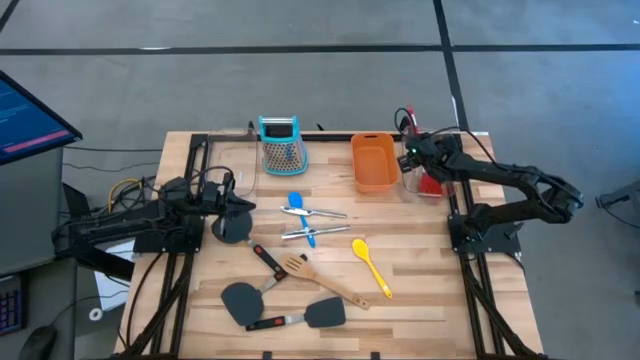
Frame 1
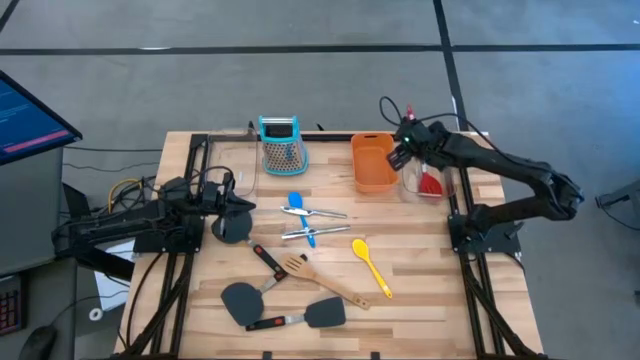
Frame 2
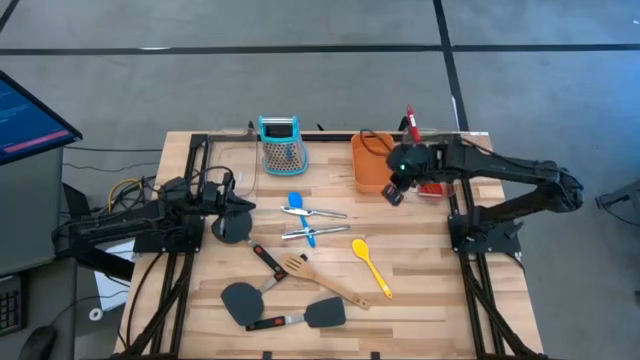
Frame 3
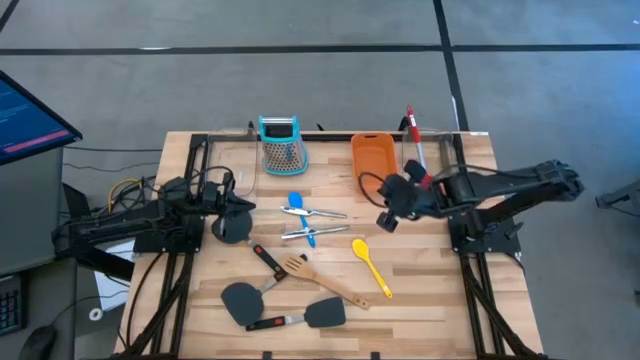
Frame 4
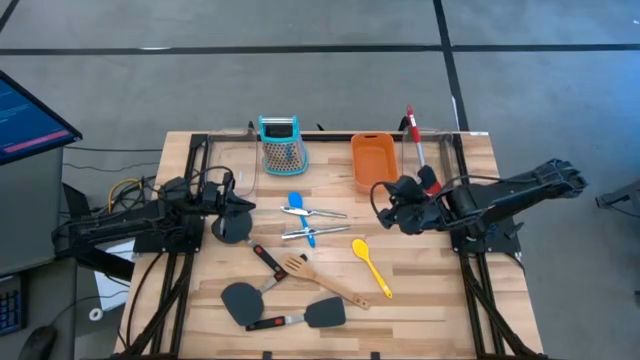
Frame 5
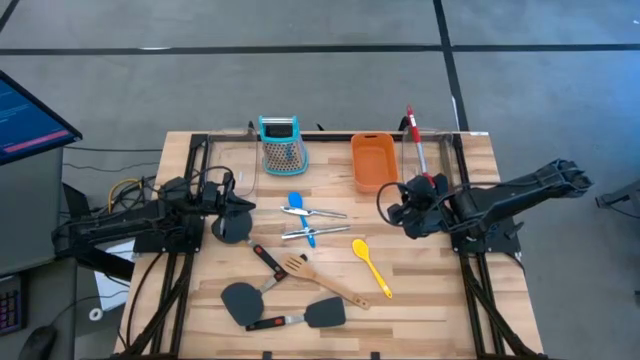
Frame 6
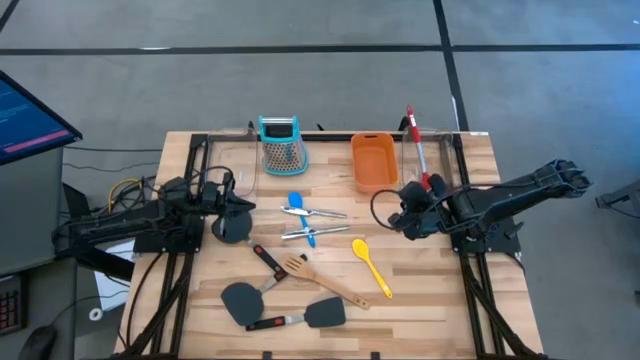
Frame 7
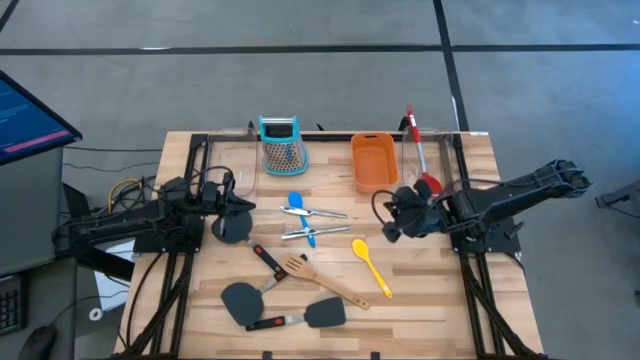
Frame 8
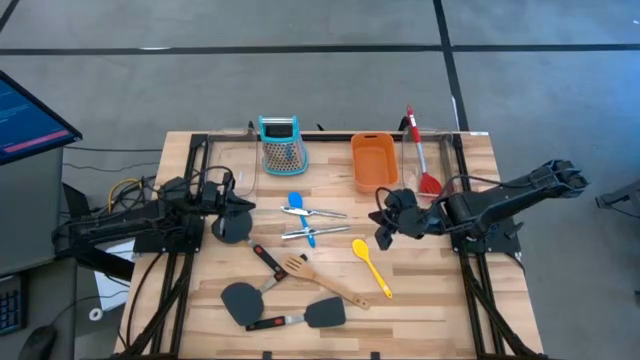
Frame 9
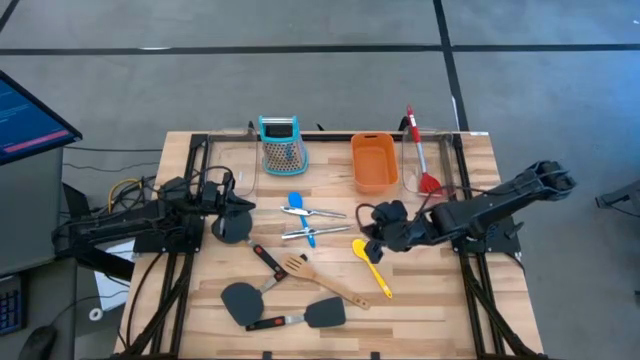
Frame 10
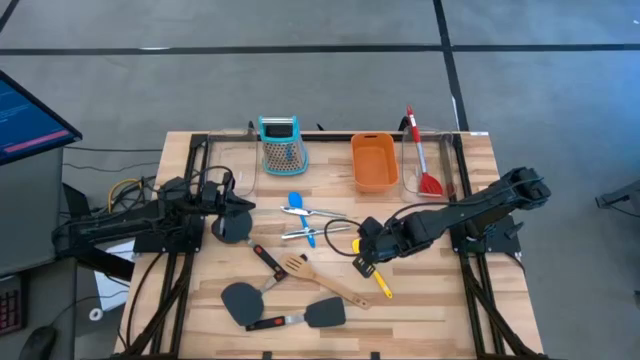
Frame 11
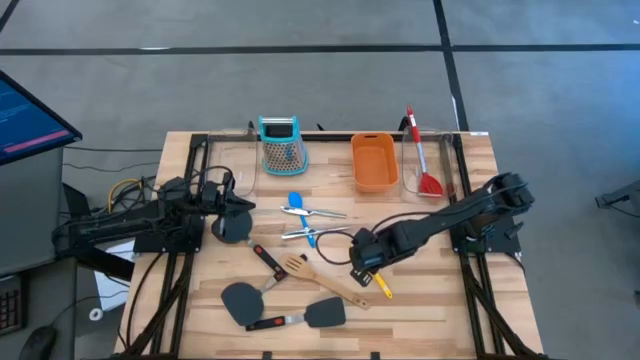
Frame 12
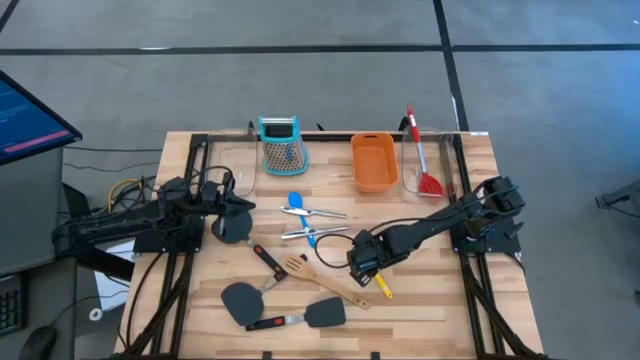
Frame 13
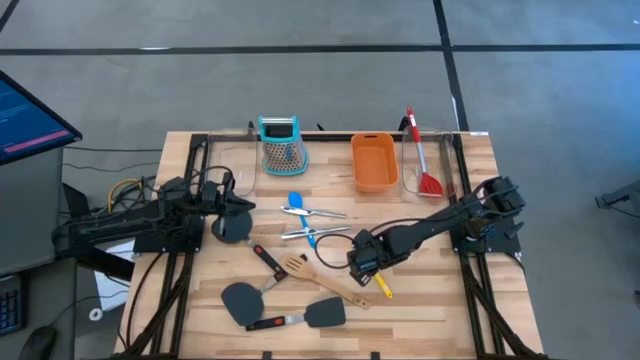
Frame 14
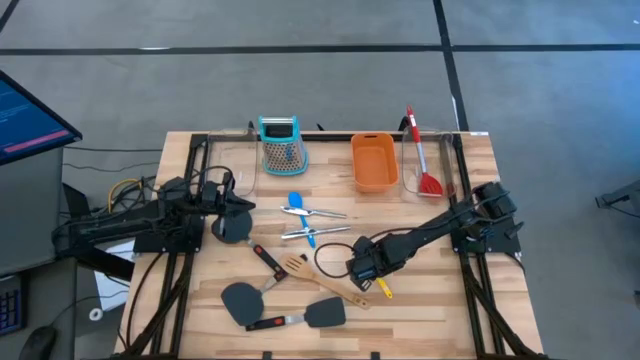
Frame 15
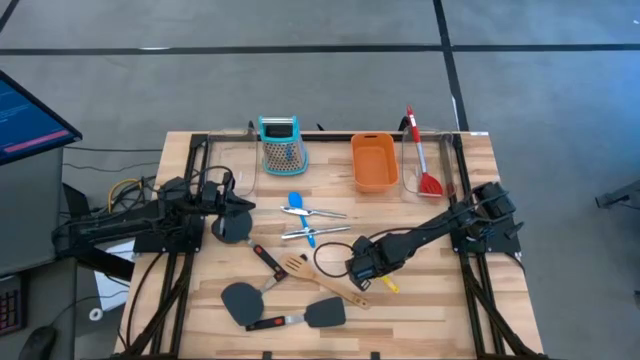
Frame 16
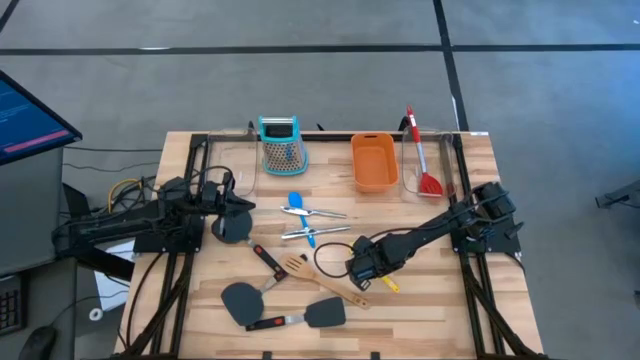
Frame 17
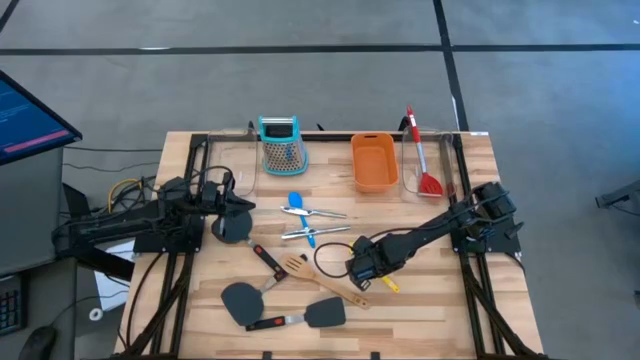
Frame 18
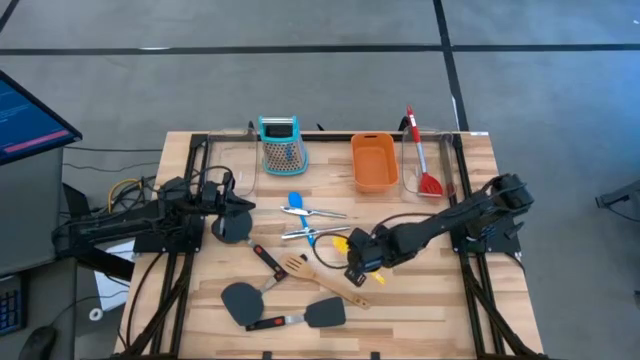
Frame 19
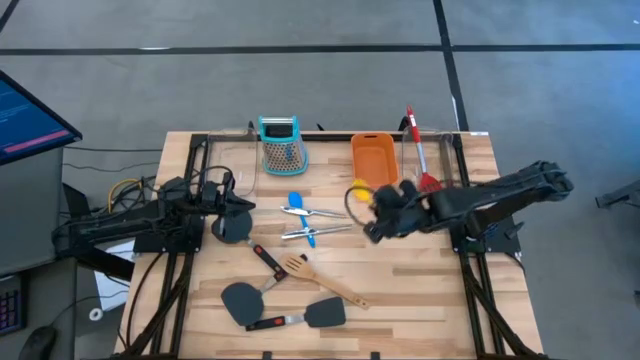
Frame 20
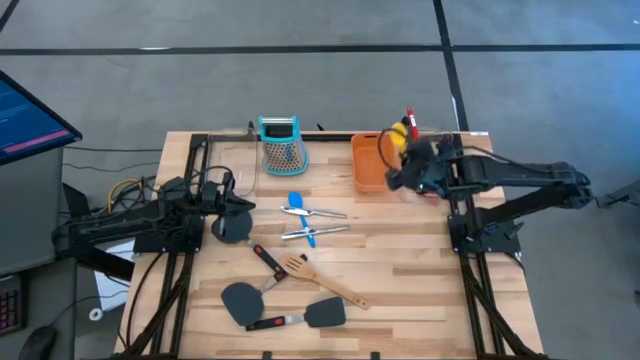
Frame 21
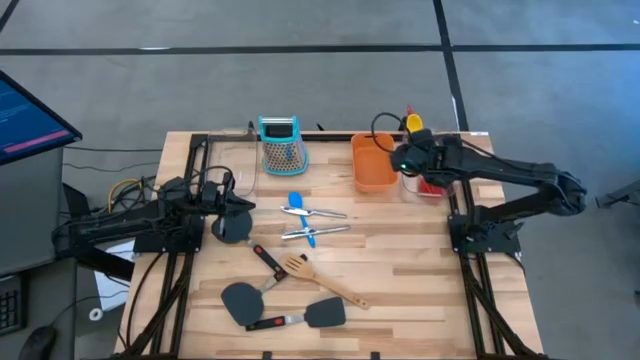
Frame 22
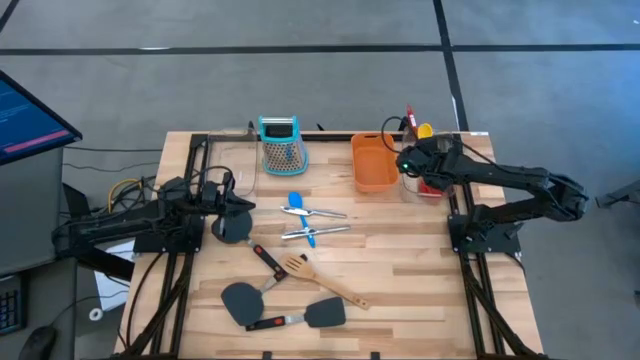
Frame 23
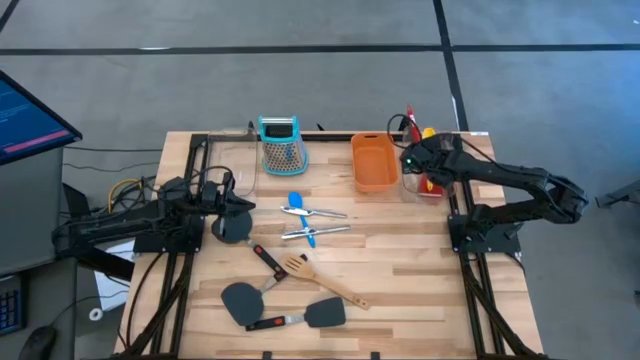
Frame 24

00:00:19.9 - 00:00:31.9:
Task: Pick & Place Kitchen Items
Put the yellow serving spoon into the right transparent bin

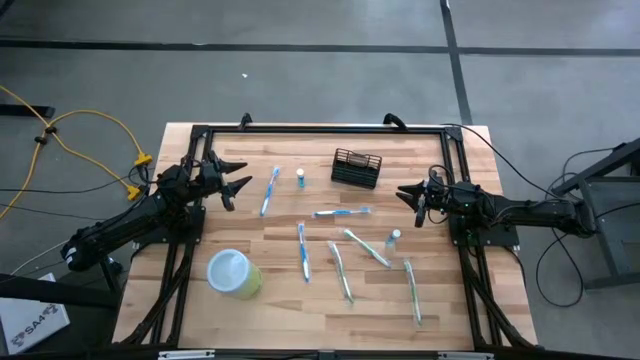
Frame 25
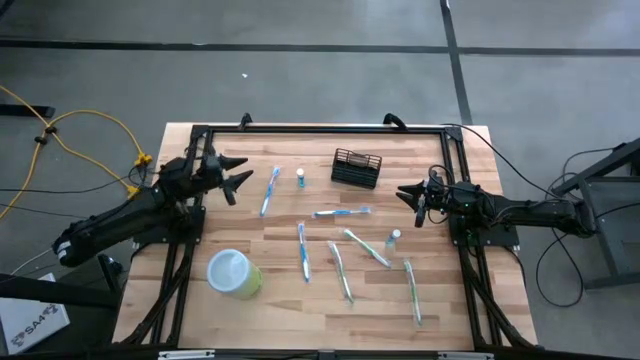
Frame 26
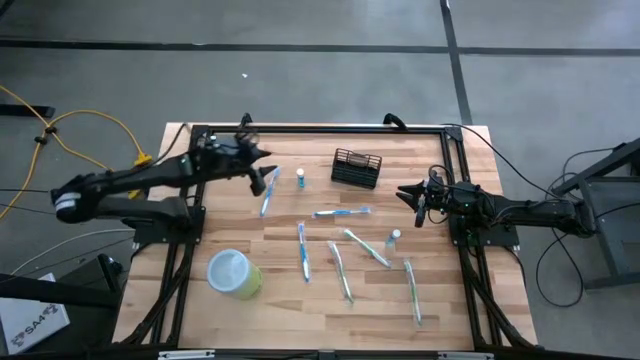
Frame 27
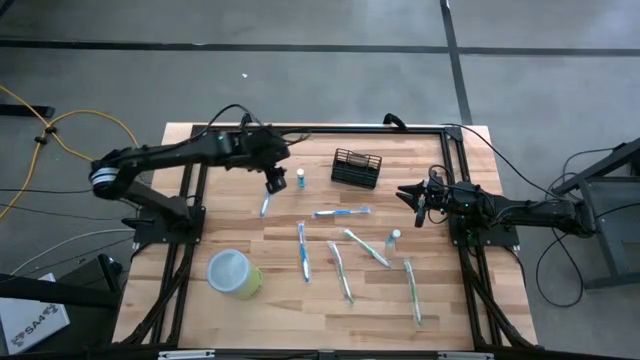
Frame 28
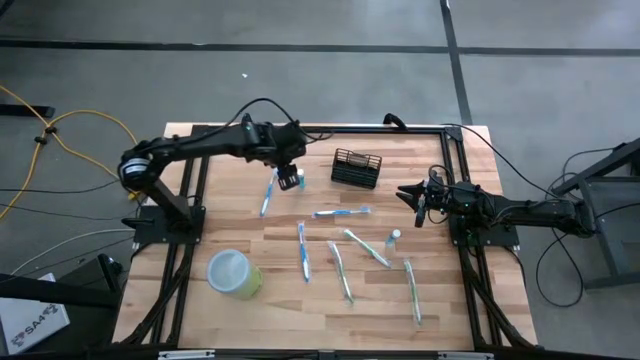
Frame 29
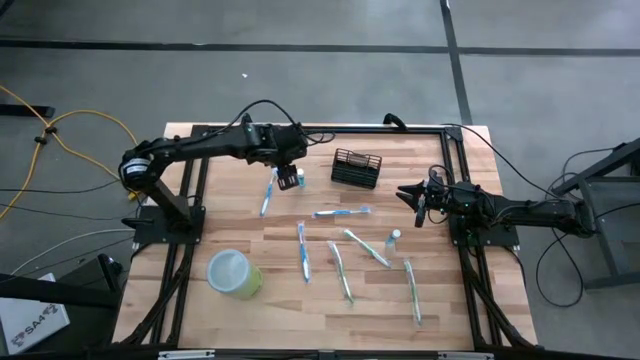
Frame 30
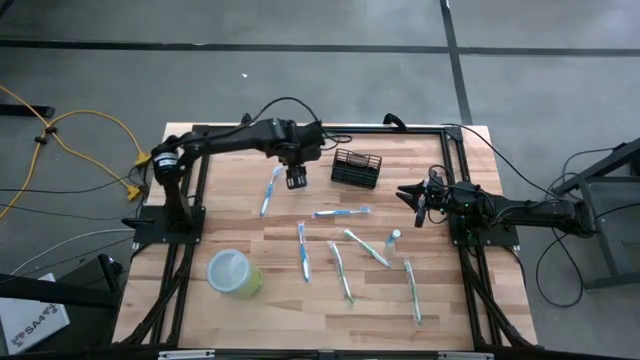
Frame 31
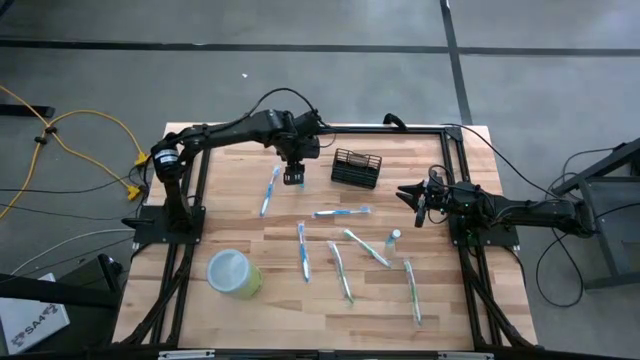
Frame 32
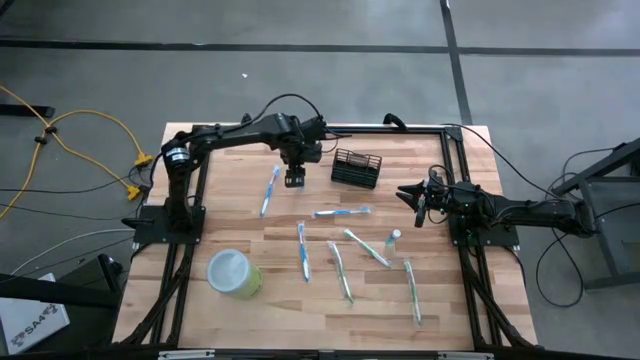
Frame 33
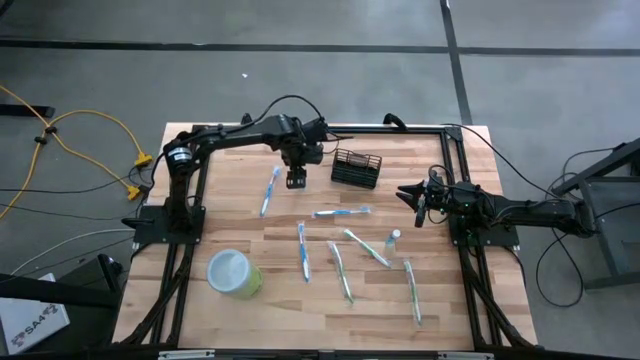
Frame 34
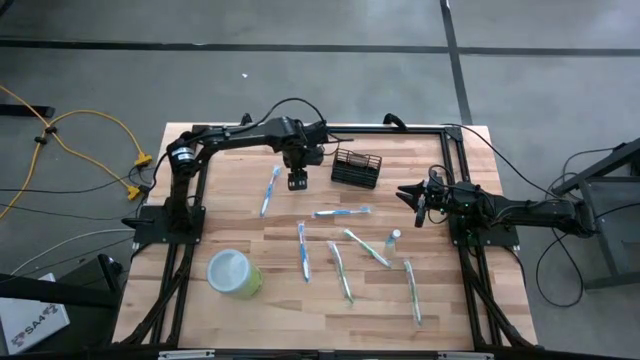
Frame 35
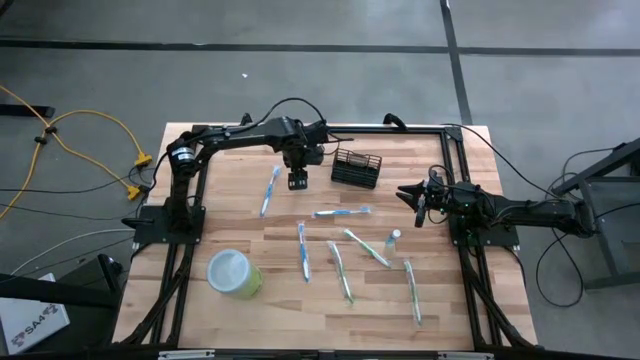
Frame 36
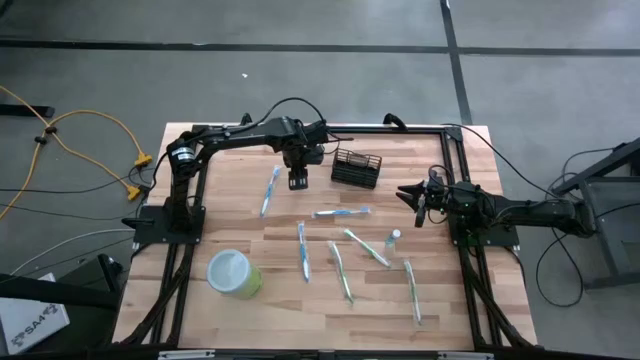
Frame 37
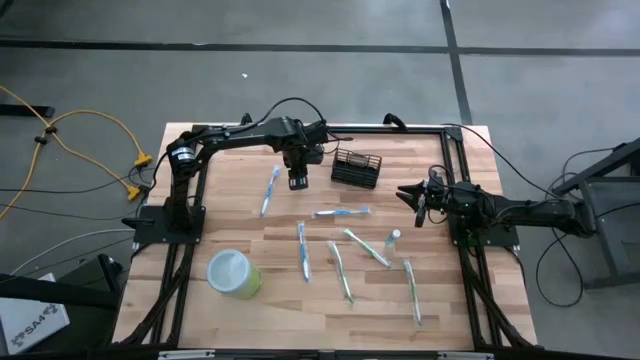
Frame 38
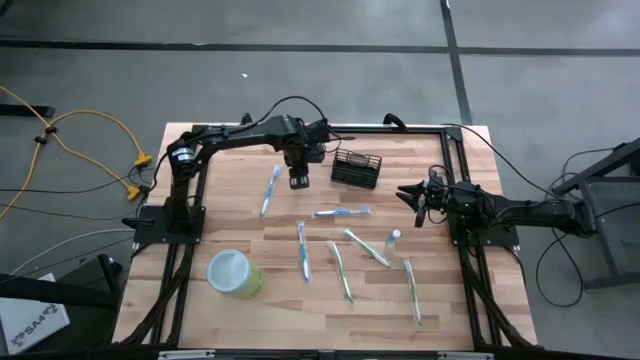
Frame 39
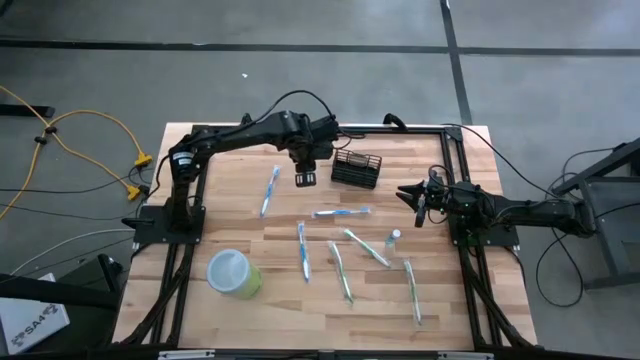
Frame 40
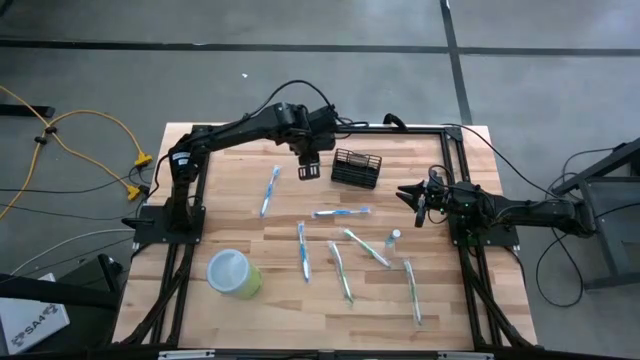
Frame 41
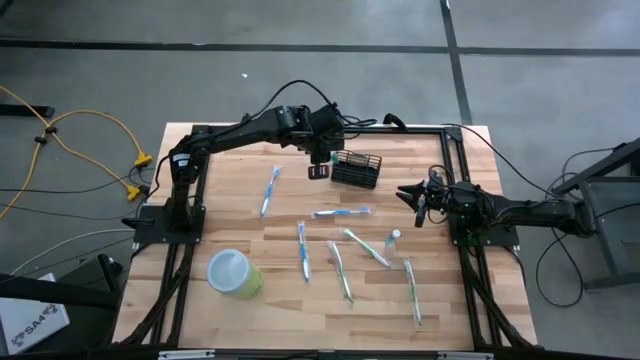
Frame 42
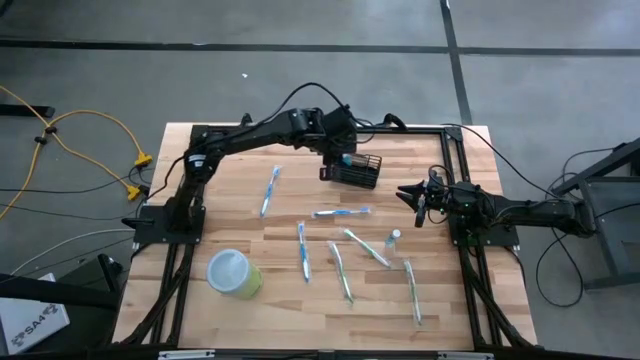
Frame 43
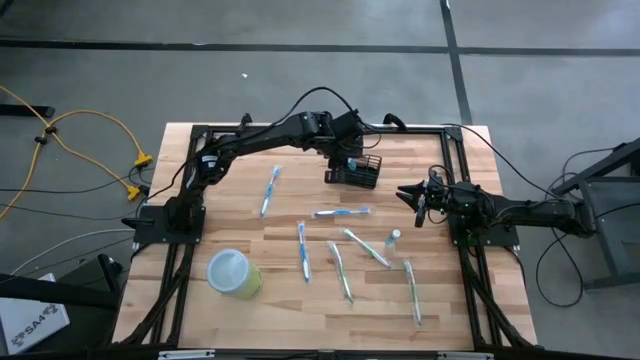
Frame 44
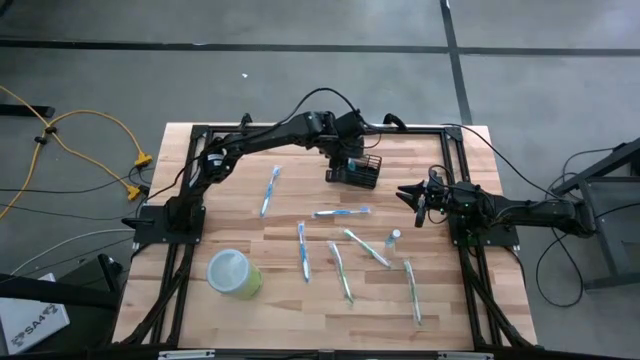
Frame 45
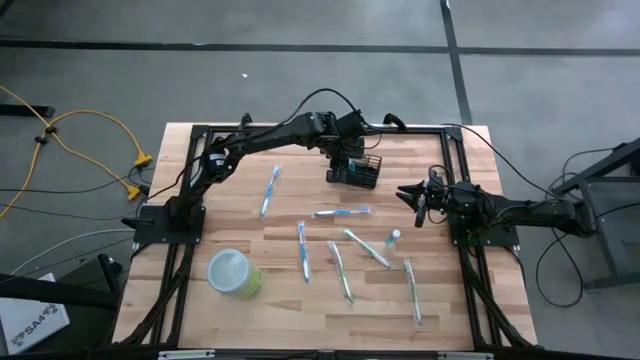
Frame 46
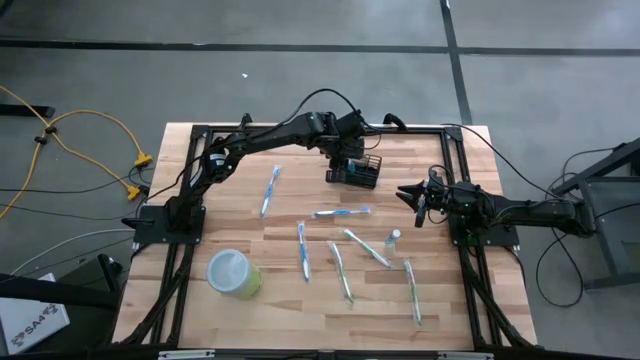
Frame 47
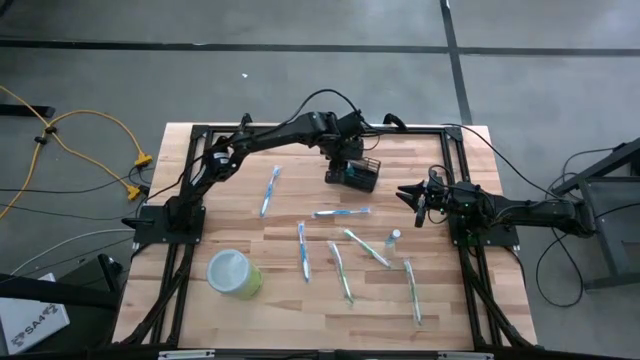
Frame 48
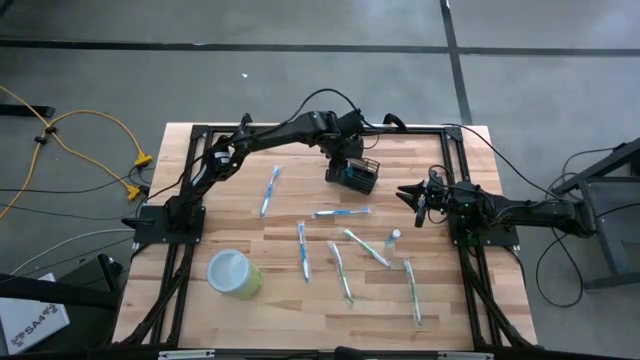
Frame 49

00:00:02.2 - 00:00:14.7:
Task: Pick & Place toothbrushing station
Put the left blue mouthwash into the middle section of the black mesh organizer
